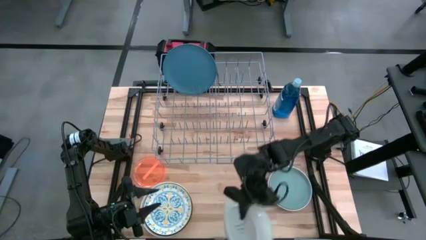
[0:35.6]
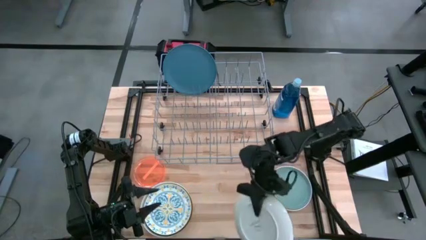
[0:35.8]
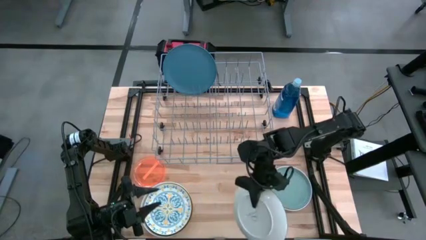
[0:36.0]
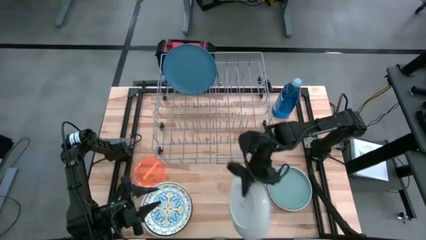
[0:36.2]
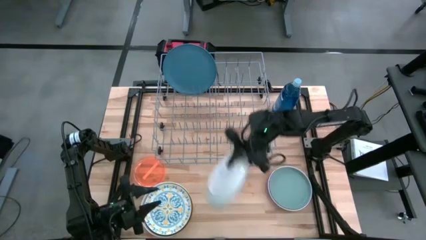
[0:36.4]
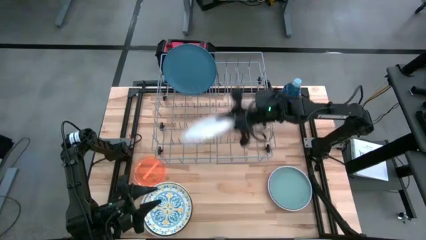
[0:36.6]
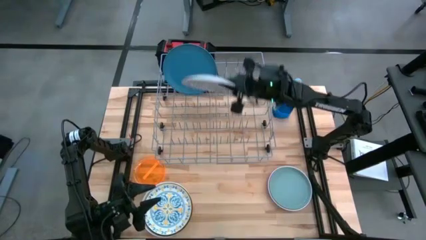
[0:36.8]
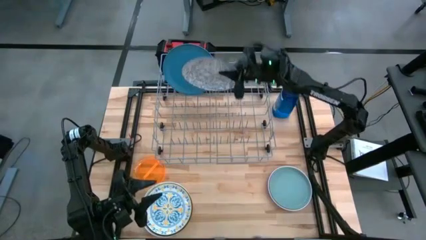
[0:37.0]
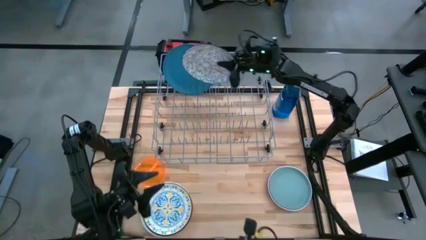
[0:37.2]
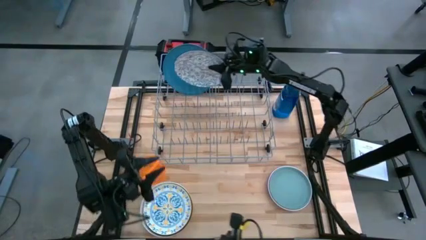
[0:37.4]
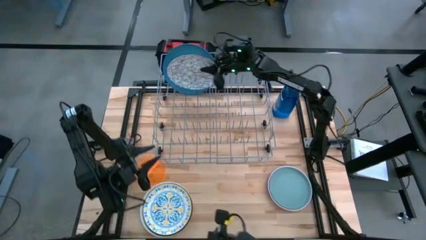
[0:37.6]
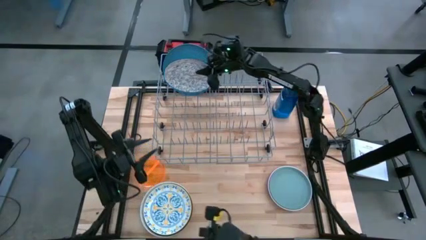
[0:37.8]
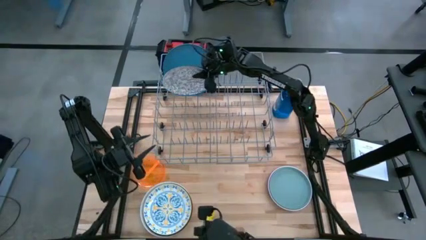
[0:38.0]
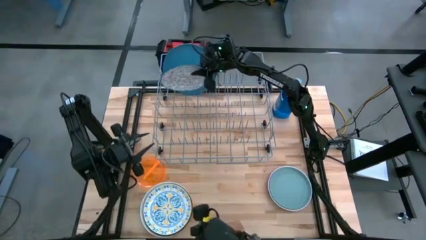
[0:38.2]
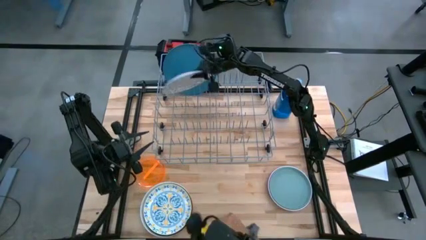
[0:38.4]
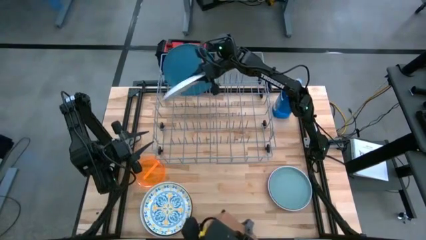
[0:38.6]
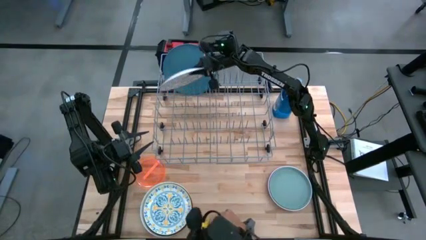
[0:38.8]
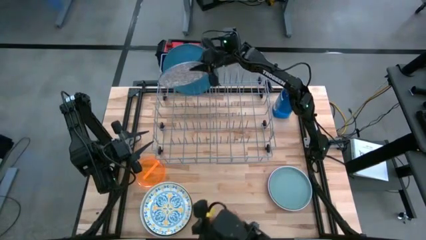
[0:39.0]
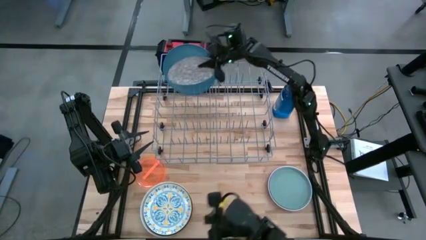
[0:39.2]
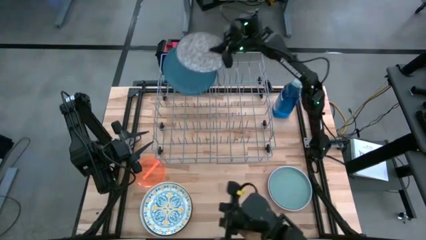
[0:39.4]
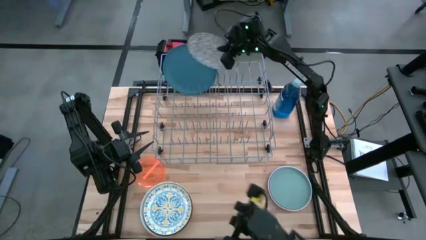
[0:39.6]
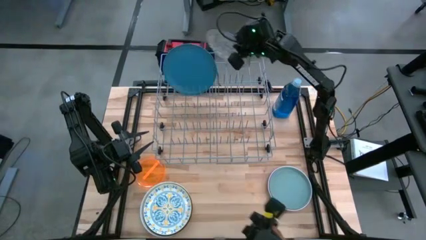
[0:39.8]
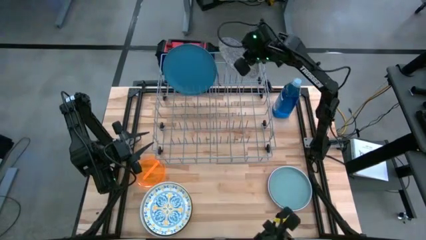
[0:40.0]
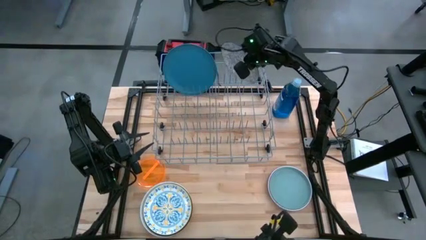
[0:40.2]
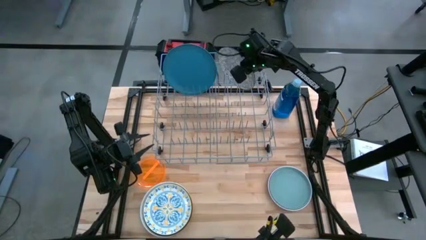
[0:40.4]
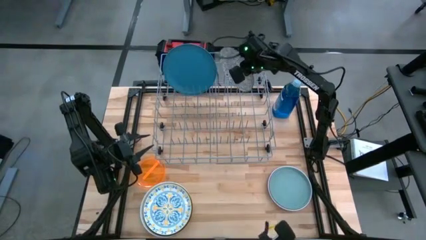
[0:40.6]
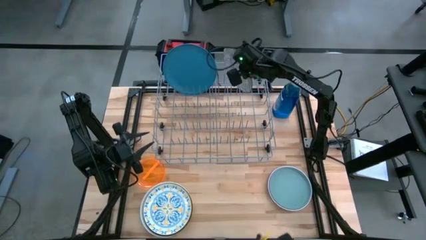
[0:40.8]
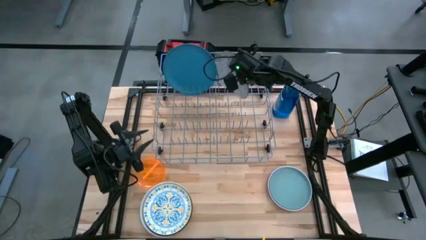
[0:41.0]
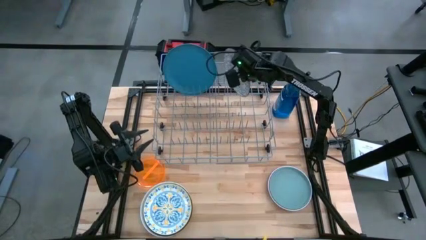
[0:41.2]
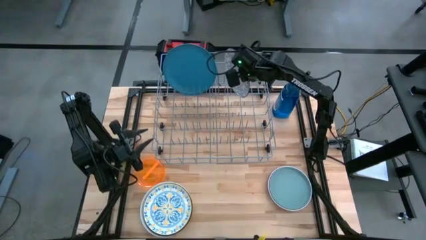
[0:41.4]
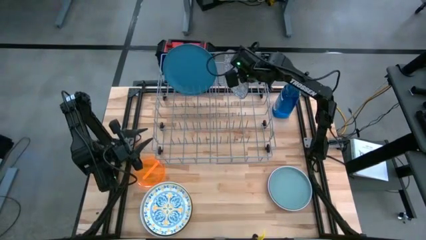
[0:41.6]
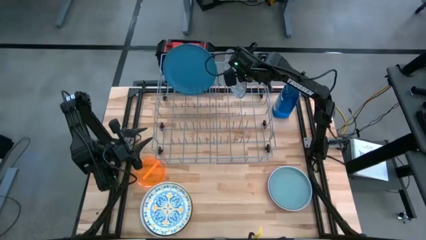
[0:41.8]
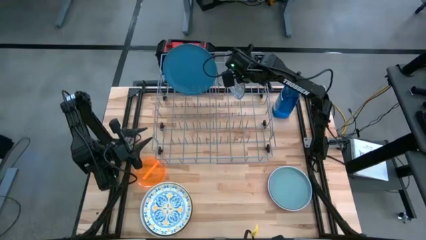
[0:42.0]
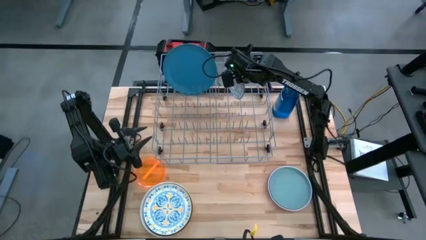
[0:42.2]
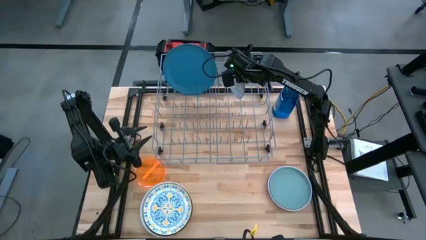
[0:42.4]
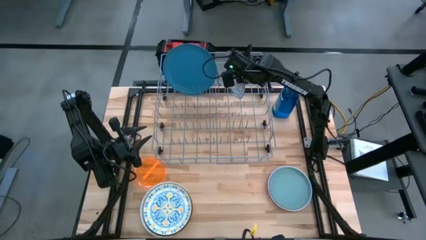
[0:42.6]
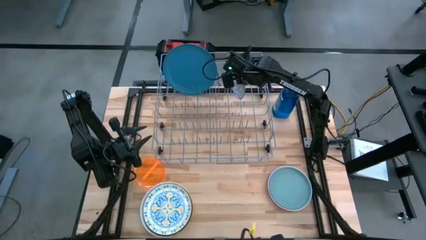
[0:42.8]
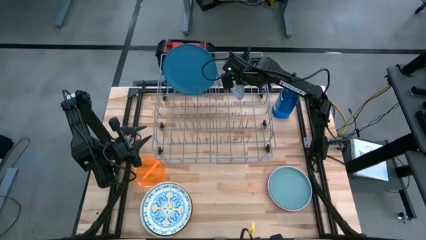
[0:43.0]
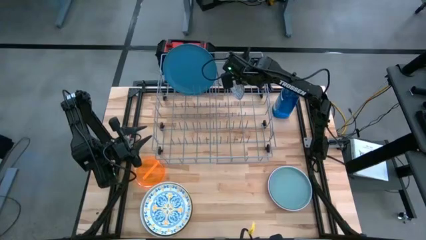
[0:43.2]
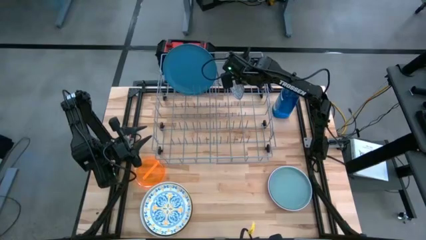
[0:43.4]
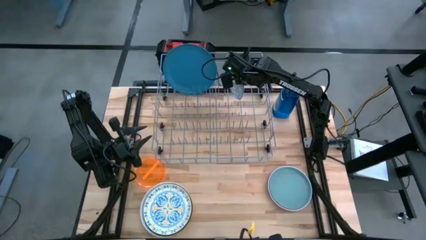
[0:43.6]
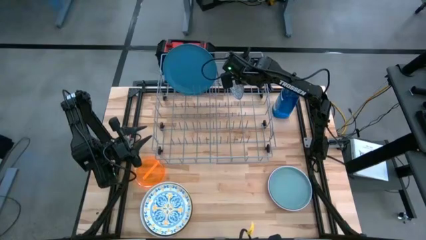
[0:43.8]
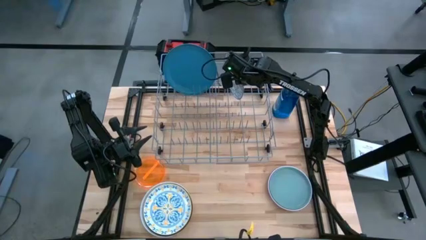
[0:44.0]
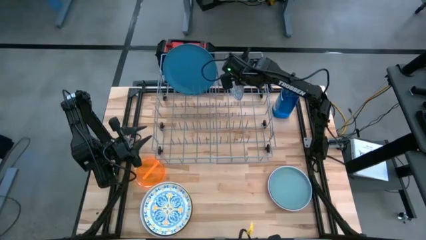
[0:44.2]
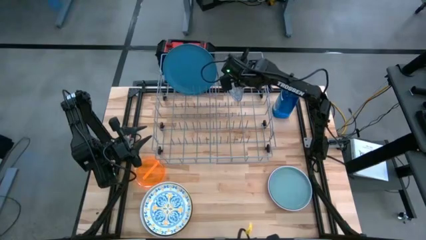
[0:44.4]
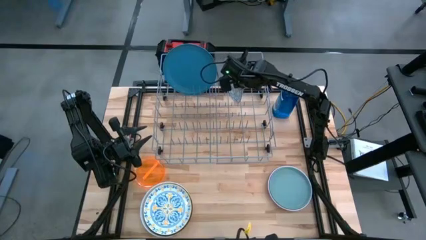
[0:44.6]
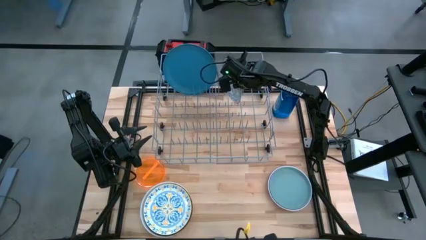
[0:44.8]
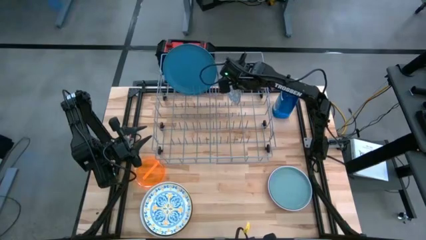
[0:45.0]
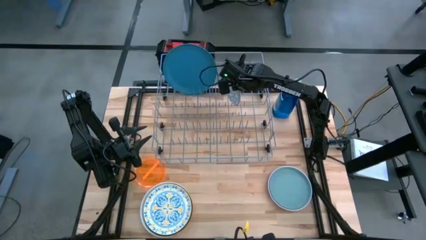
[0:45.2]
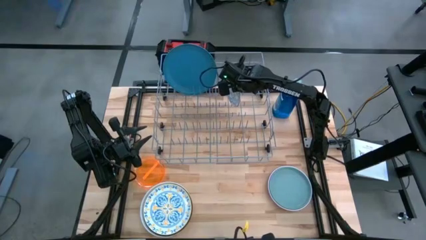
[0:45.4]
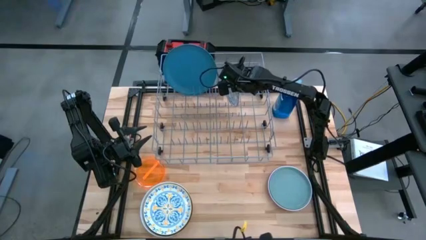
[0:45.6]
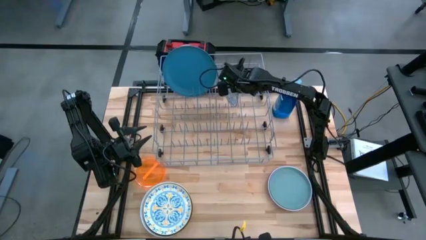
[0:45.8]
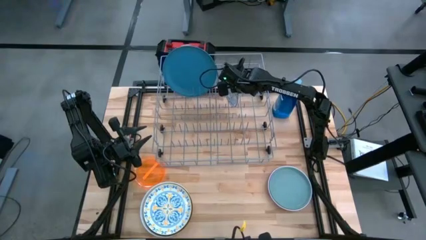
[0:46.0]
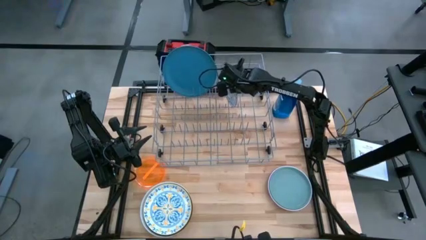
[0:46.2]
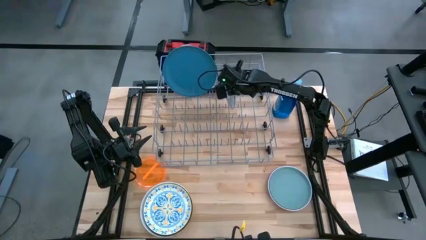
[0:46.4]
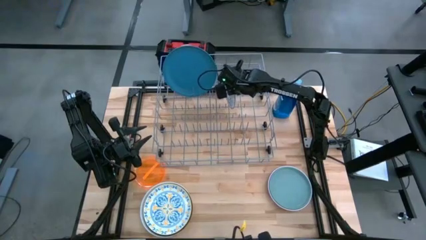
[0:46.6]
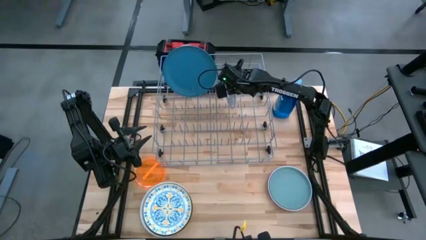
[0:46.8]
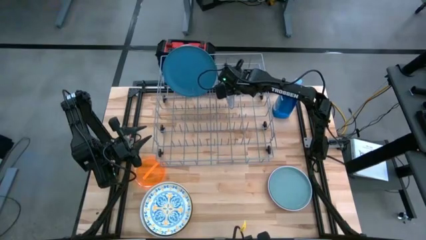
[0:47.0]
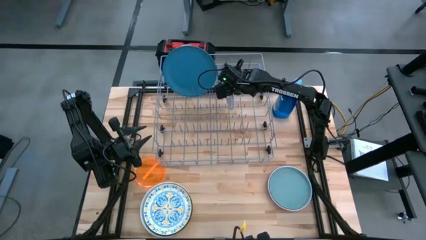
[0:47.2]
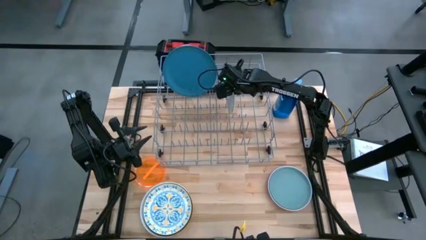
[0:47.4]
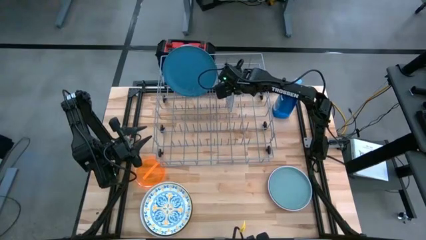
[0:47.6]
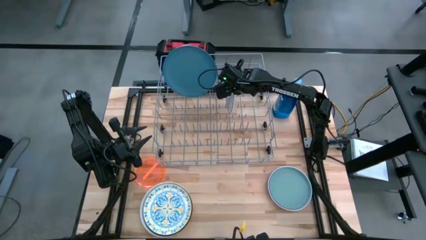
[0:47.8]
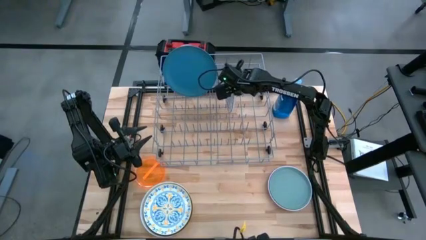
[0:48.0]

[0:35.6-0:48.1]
Task: Sort dishes
Put the white patterned plate in the dish rack
